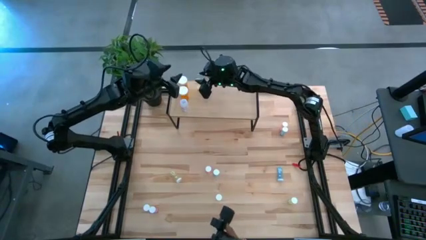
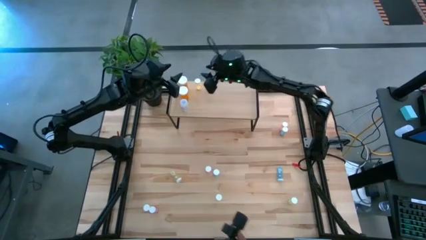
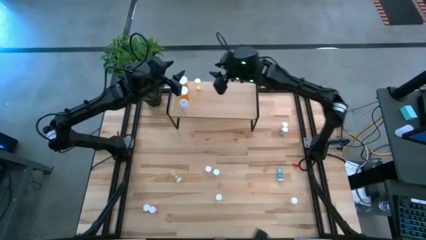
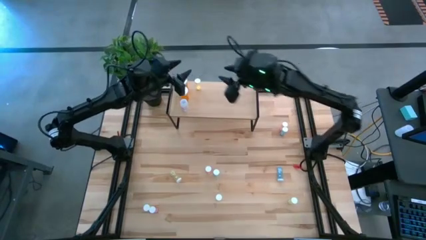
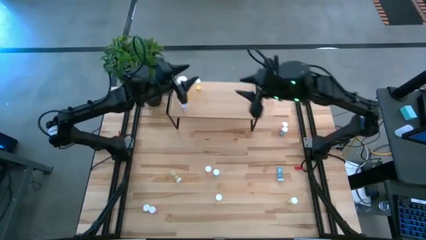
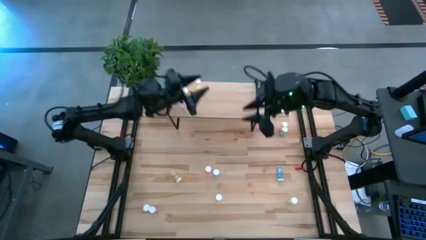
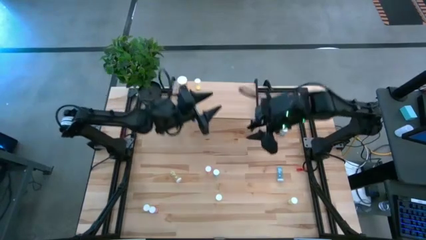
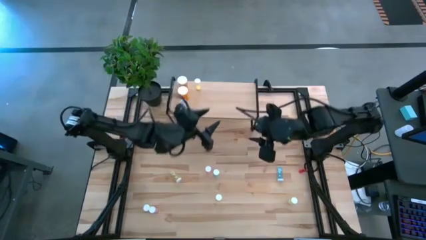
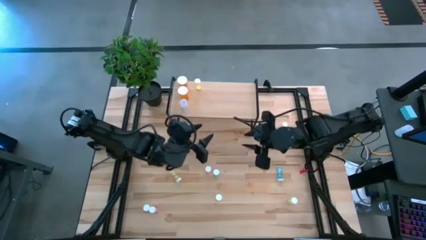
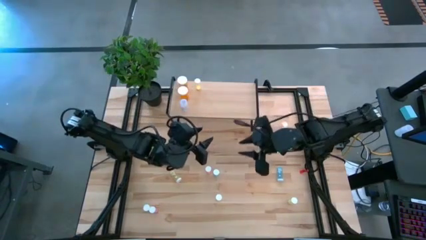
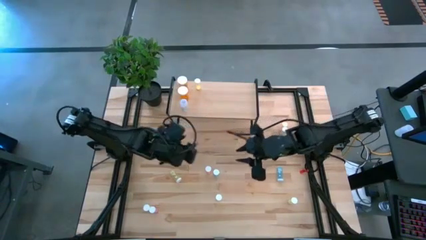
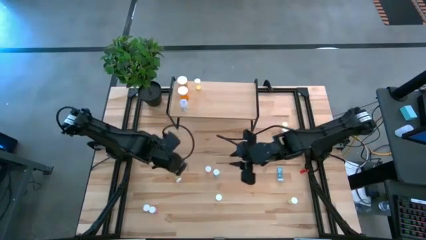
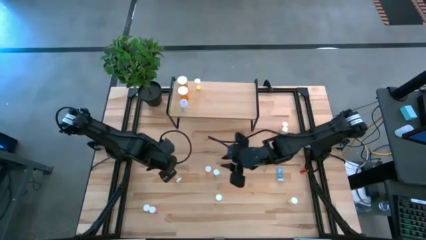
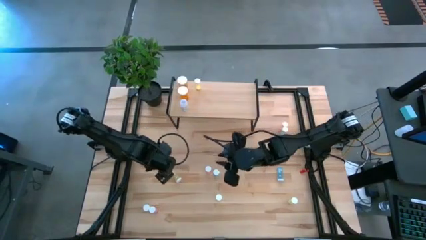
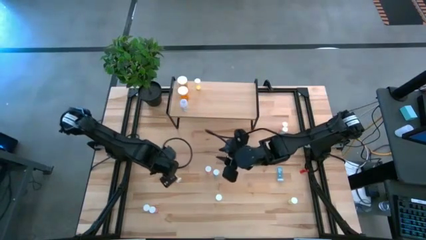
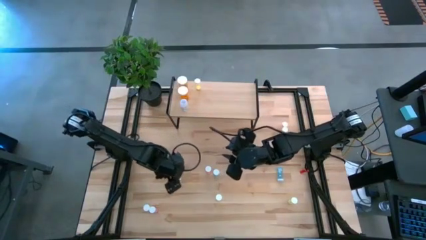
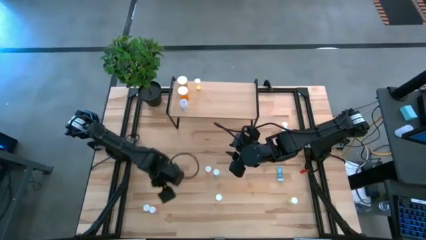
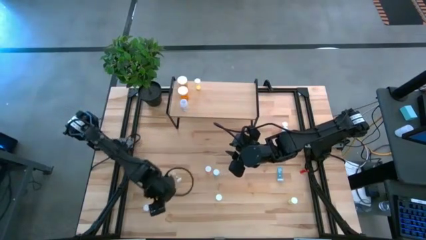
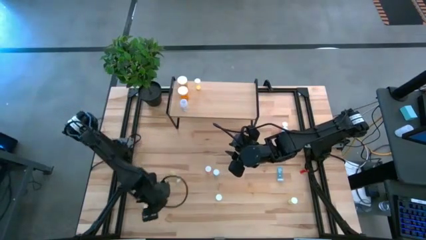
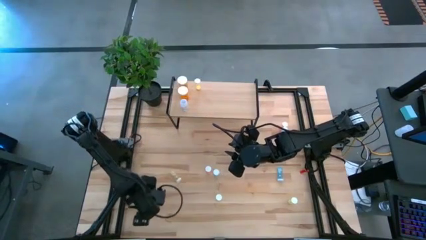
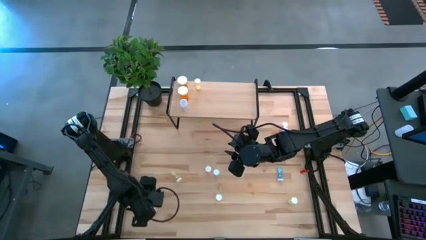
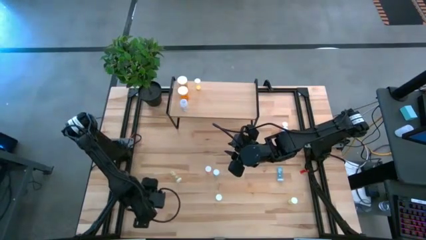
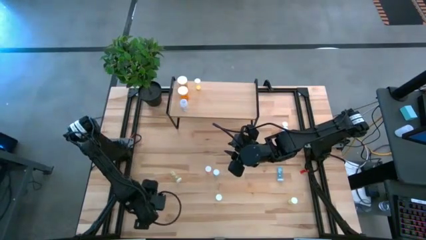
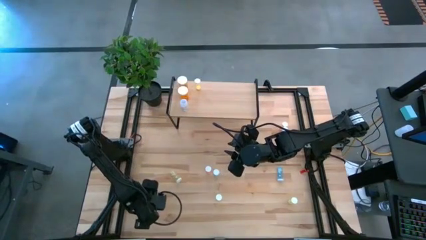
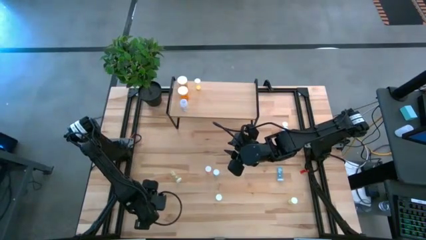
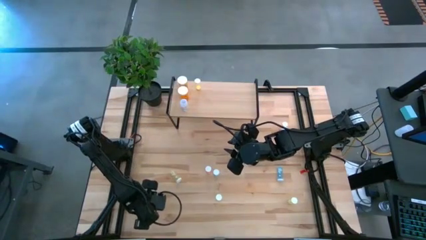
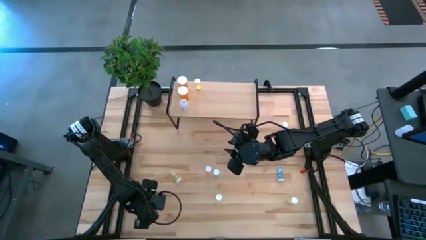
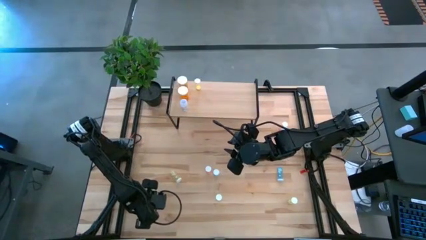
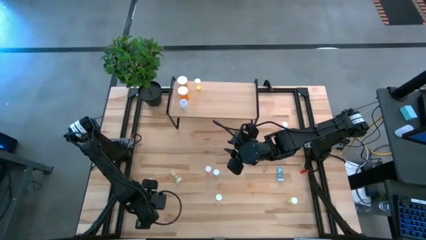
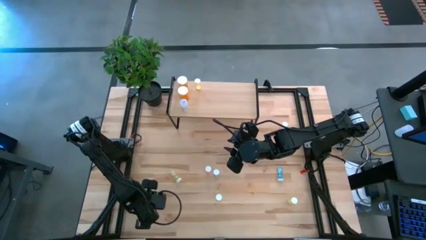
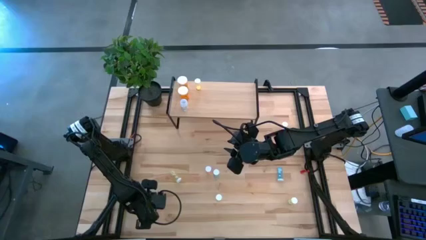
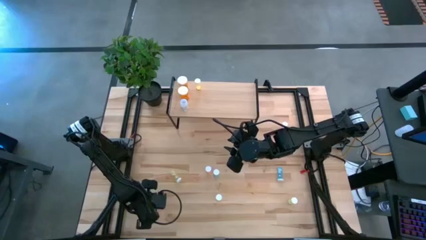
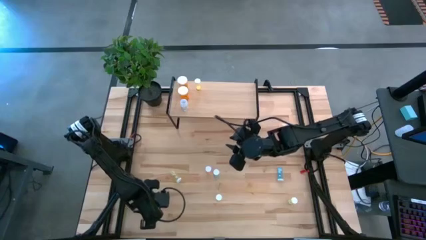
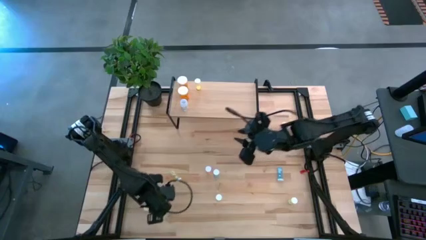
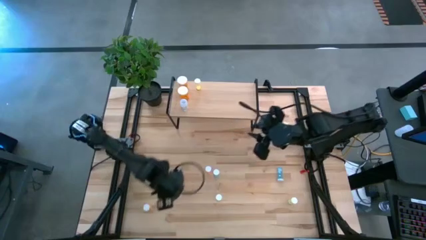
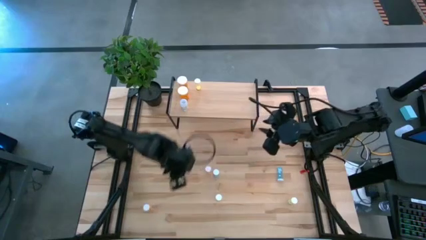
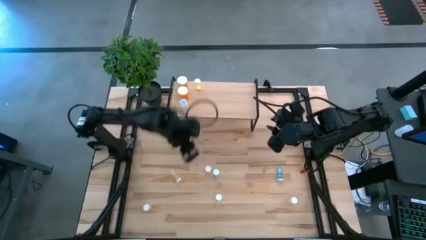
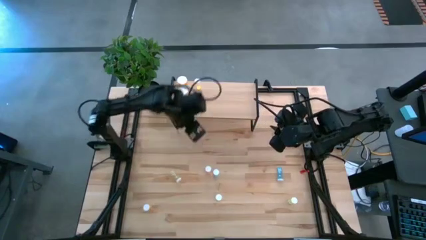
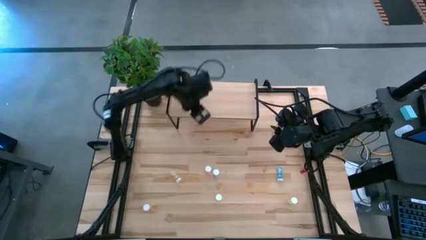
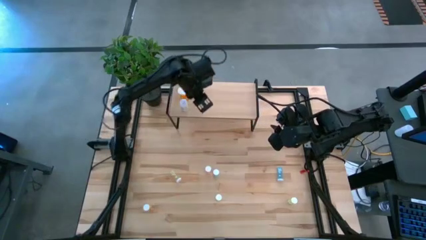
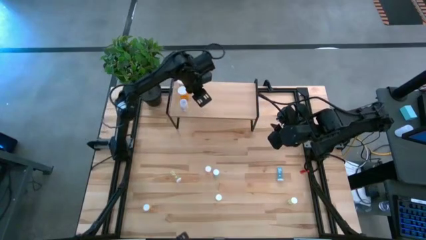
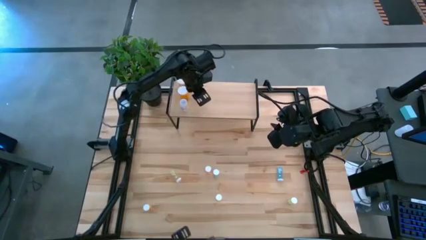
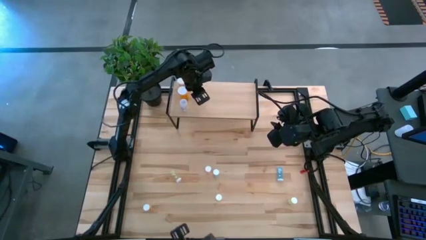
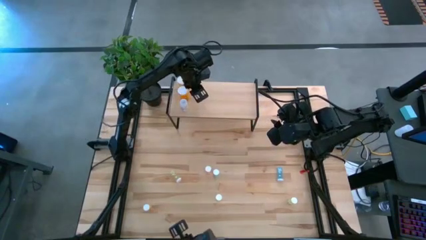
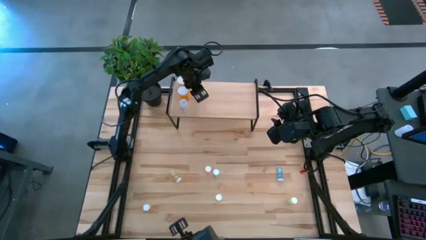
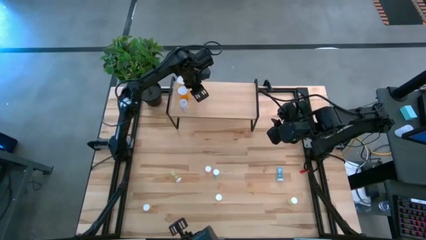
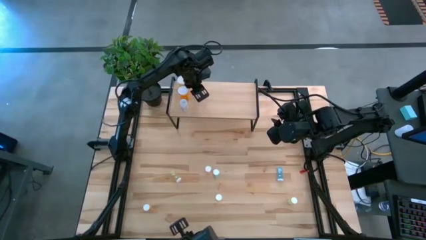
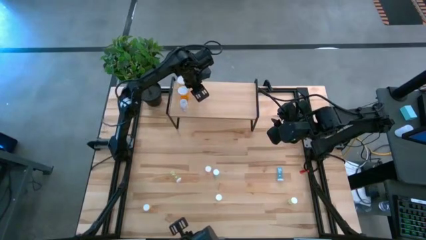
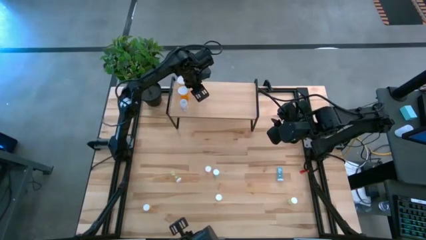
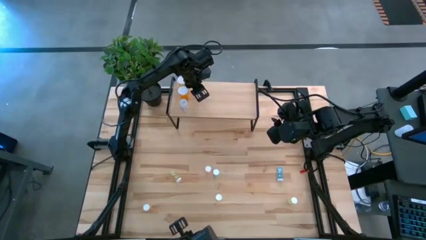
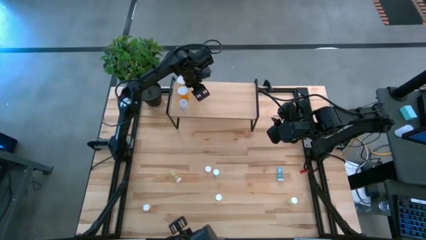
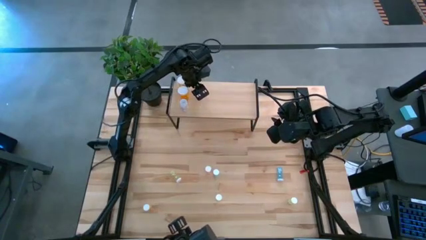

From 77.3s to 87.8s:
Task: Pick and place medicine bottles onto shelf by color
Put the pink pill bottle on the shelf

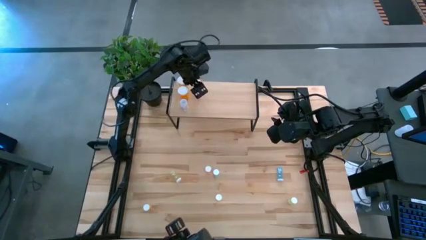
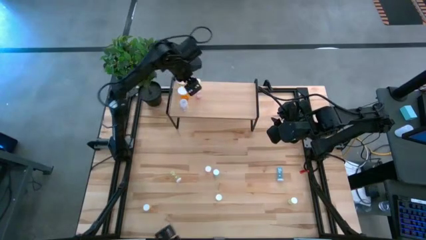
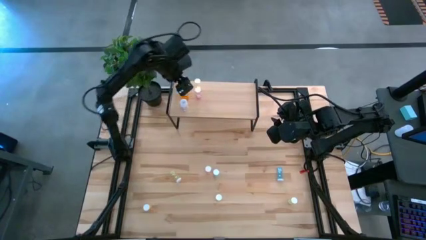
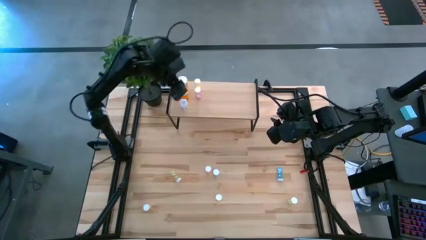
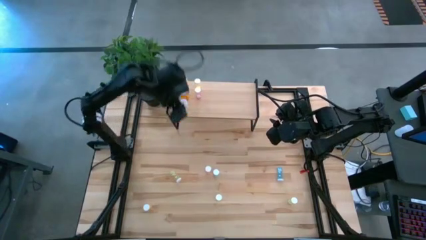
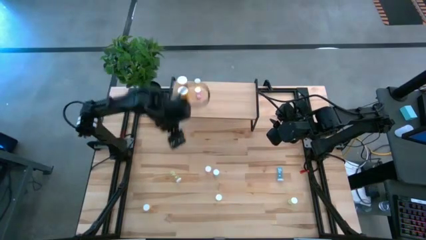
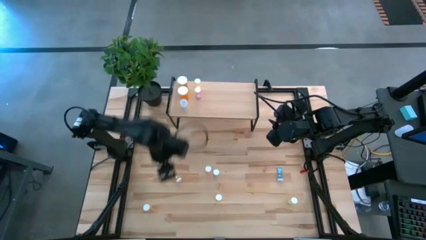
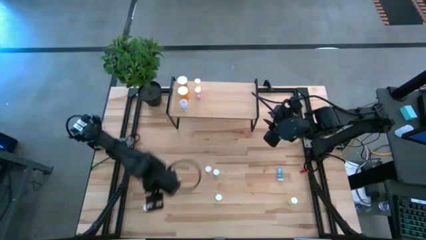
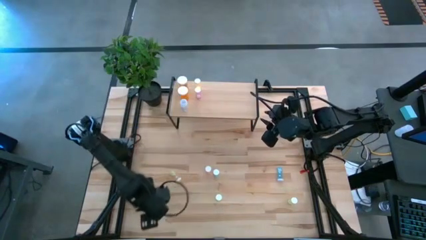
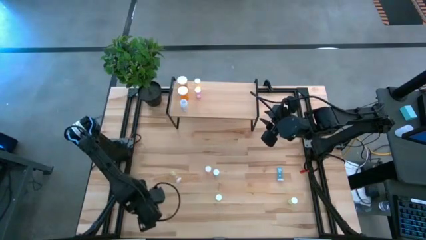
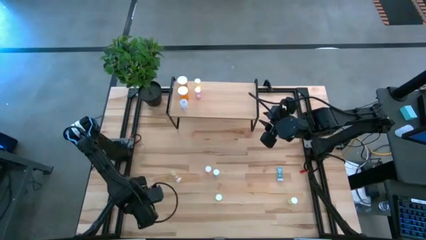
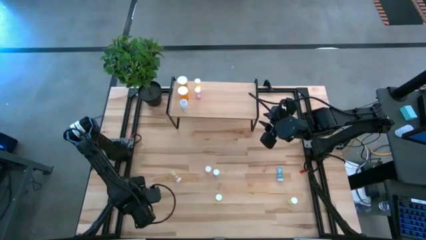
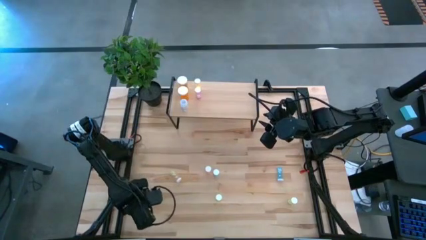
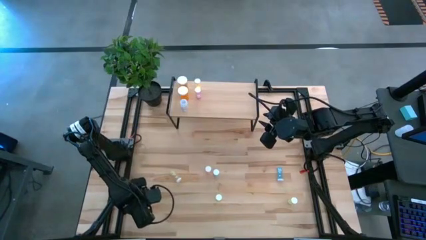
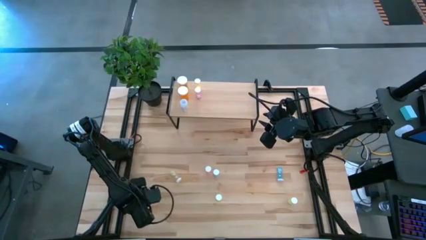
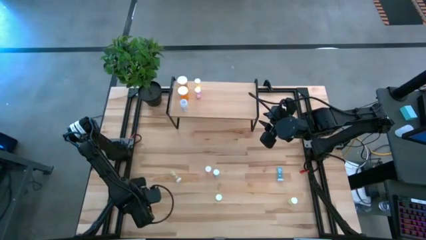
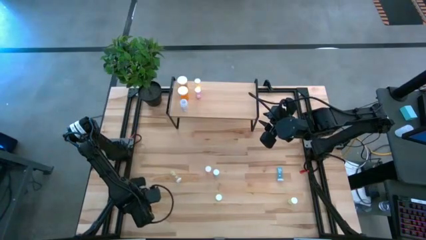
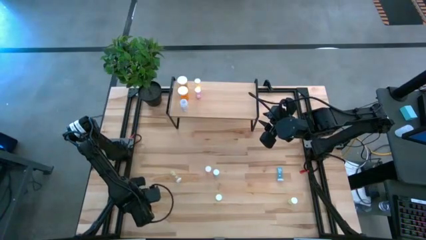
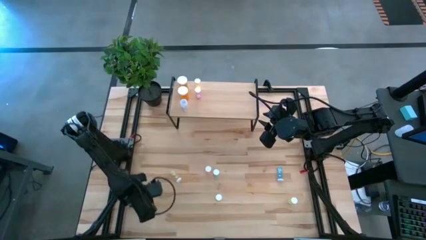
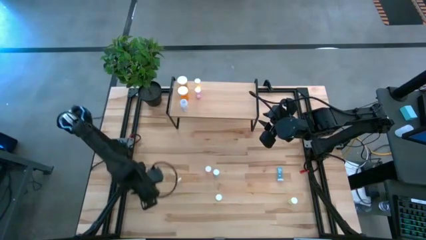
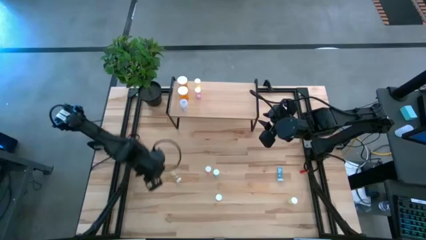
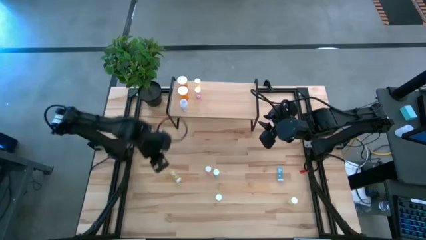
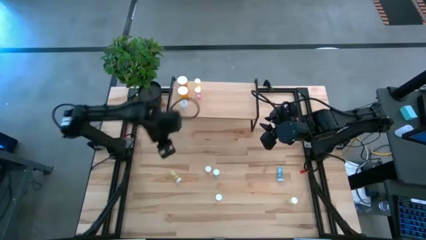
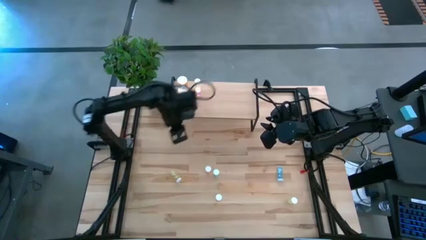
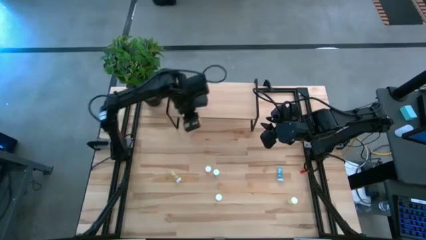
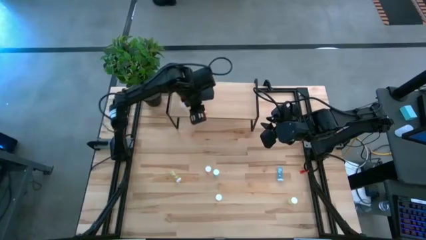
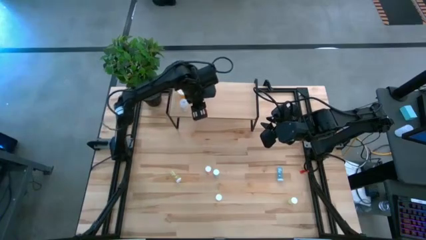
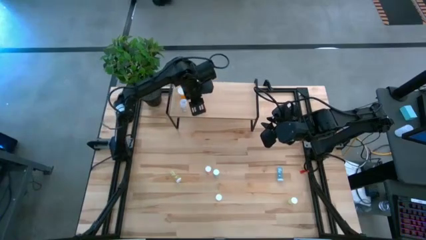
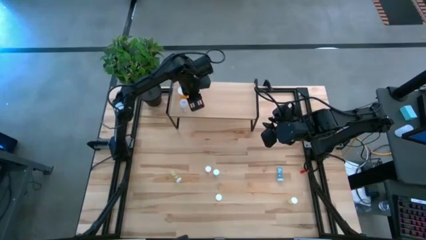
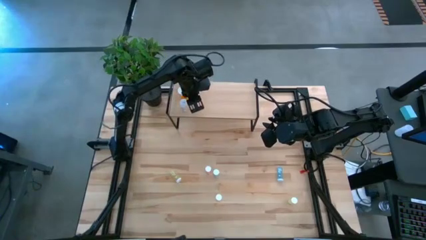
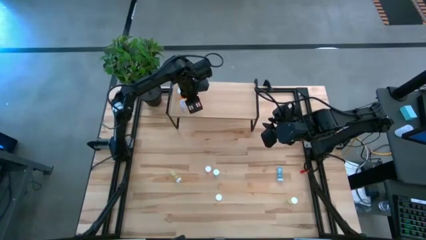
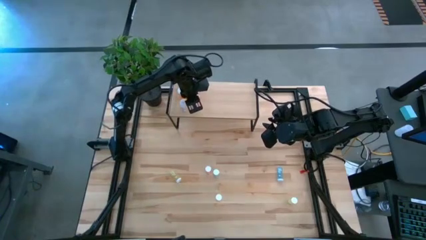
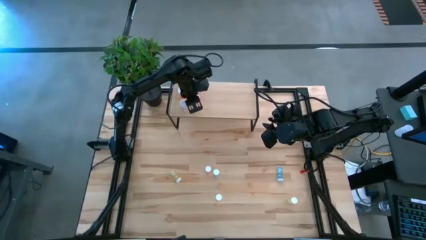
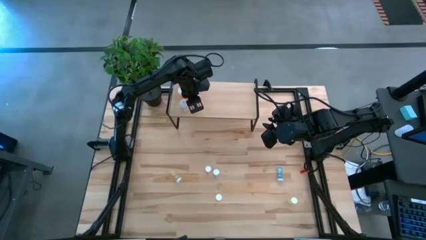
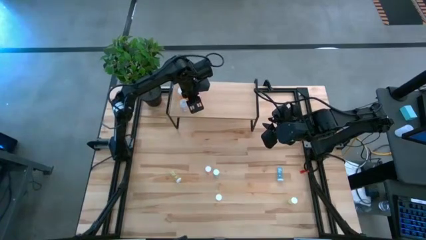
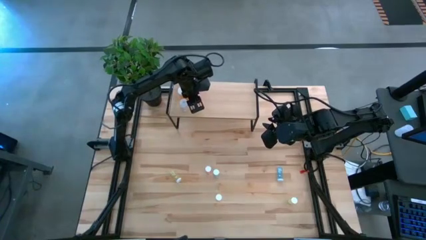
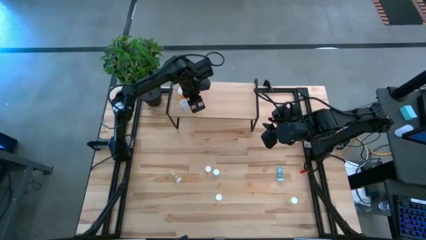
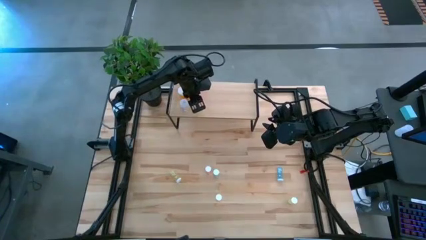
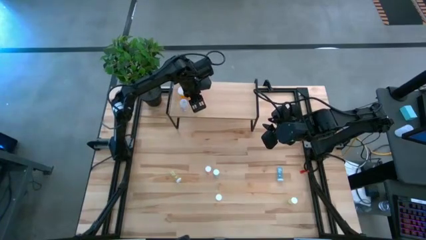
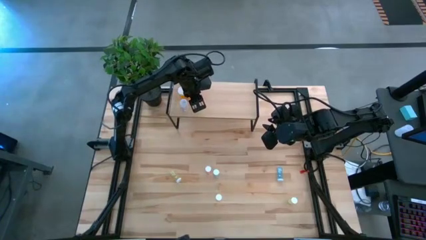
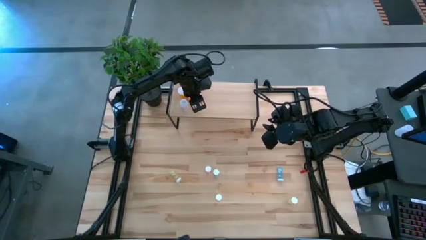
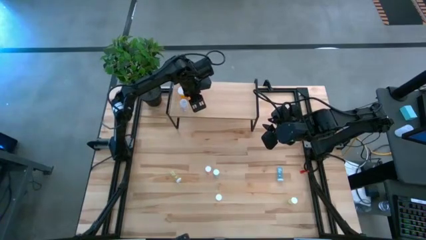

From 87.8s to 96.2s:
Put the light orange pill bottle on the shelf
